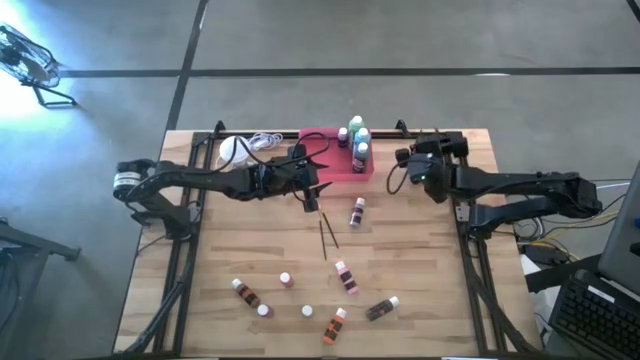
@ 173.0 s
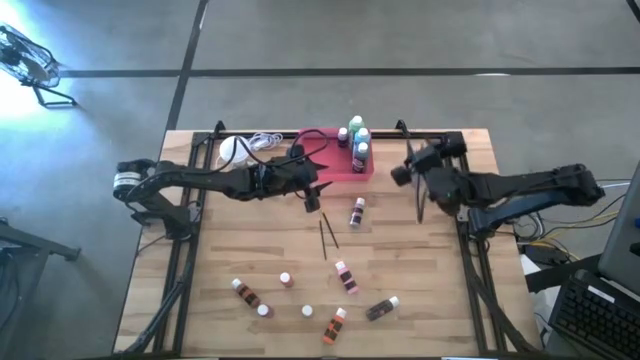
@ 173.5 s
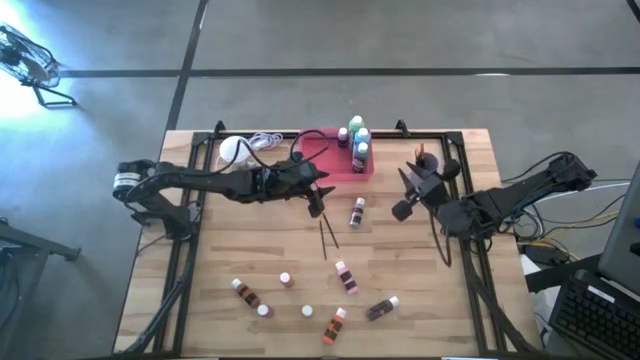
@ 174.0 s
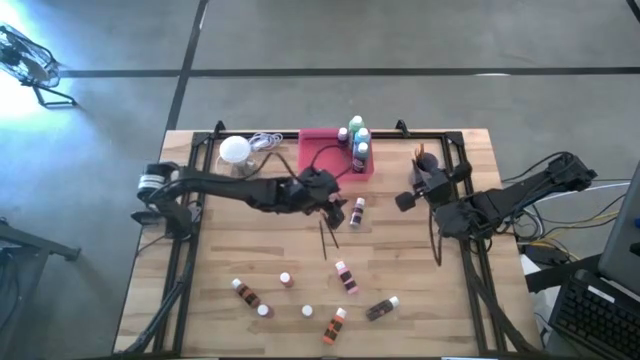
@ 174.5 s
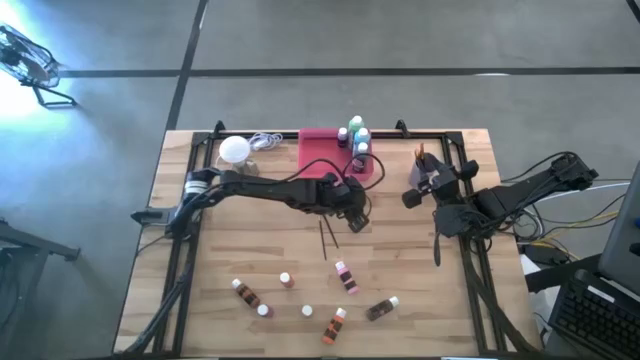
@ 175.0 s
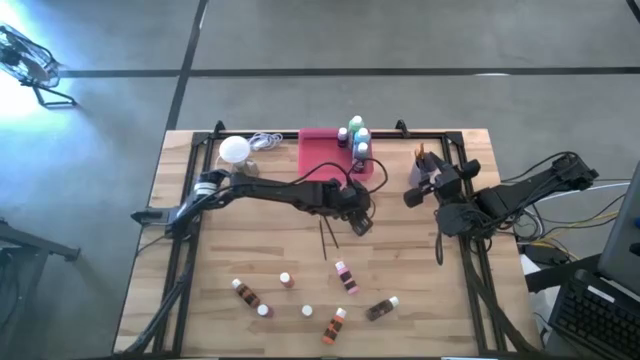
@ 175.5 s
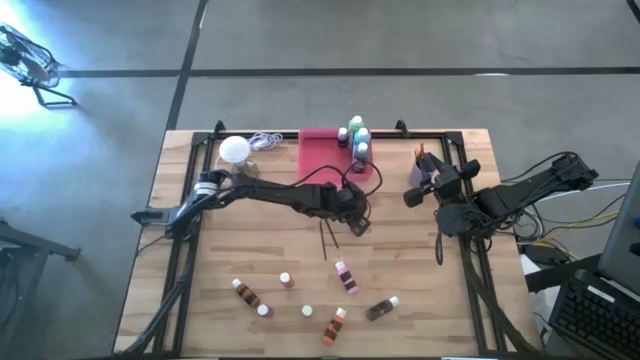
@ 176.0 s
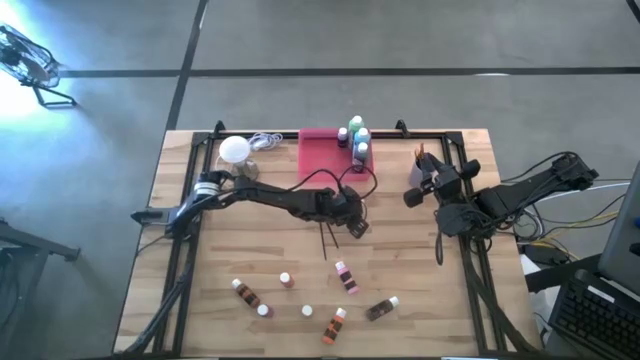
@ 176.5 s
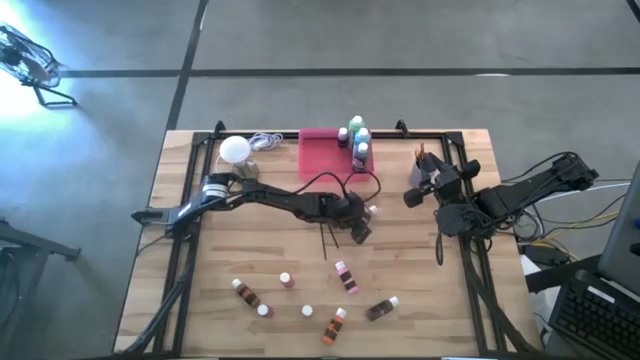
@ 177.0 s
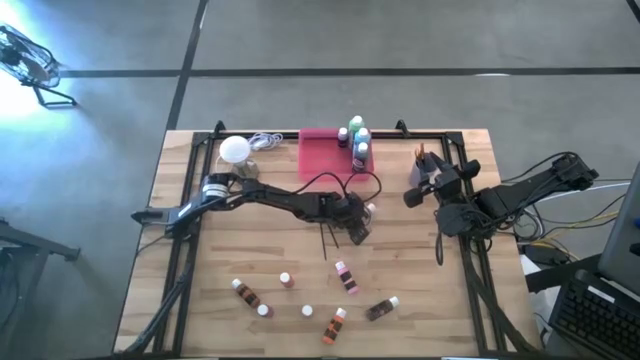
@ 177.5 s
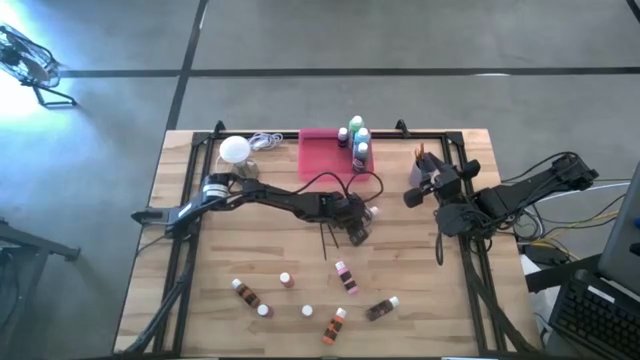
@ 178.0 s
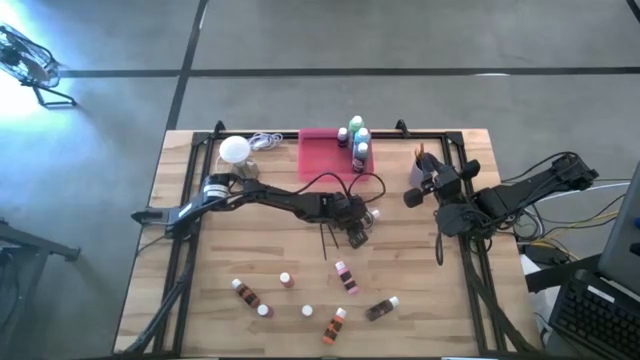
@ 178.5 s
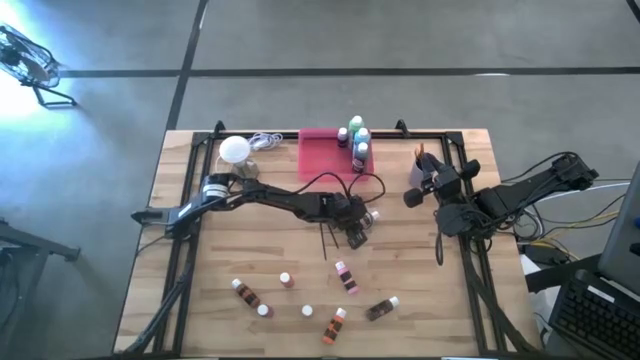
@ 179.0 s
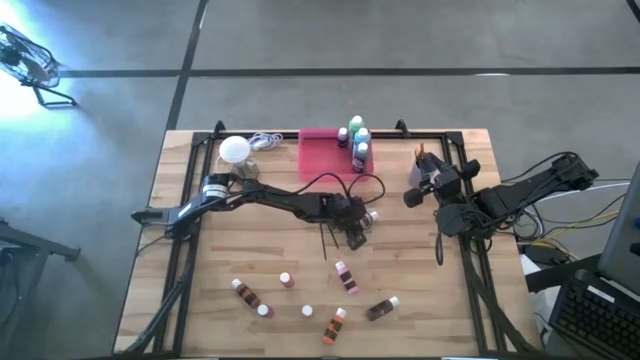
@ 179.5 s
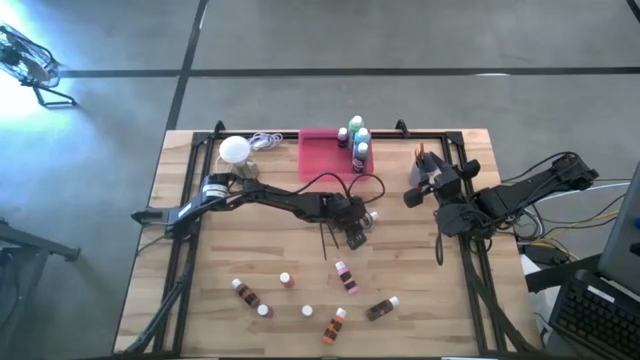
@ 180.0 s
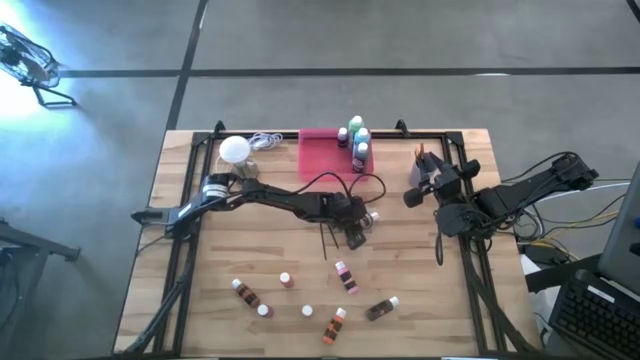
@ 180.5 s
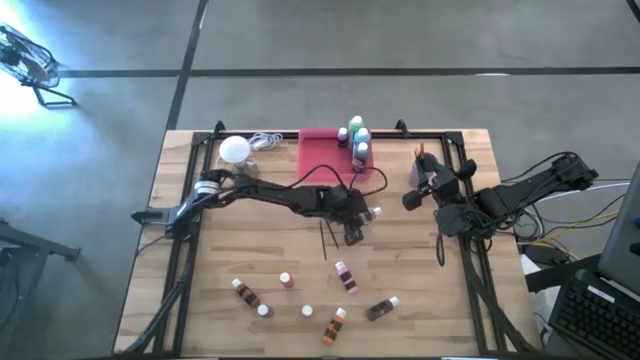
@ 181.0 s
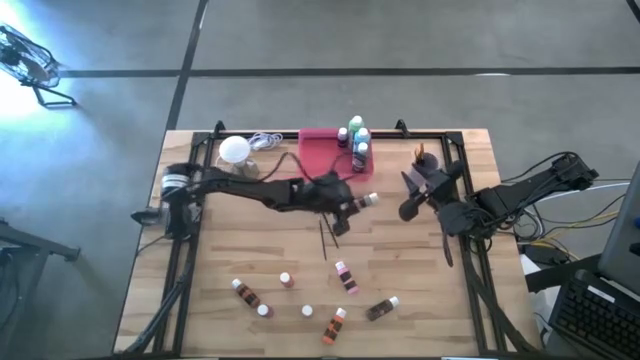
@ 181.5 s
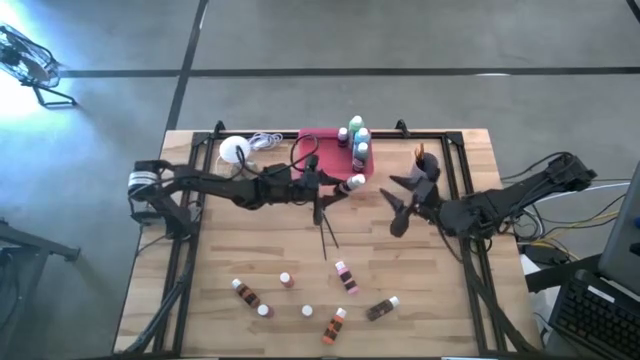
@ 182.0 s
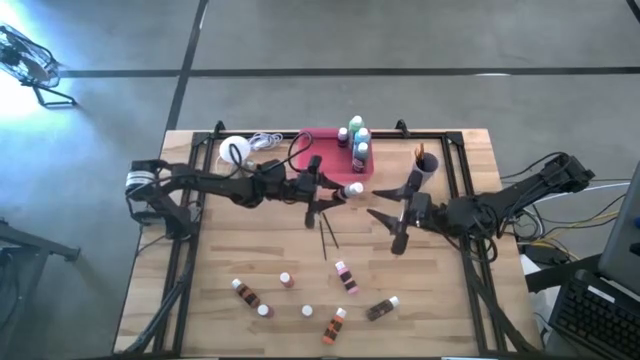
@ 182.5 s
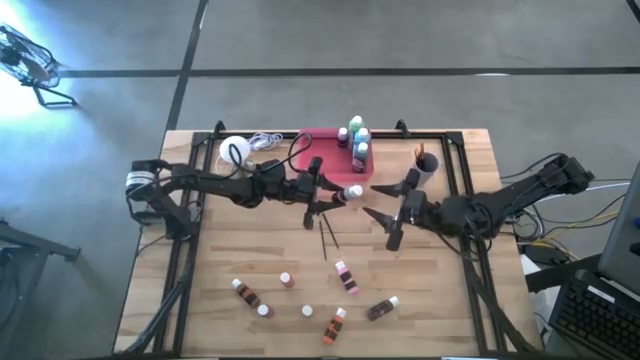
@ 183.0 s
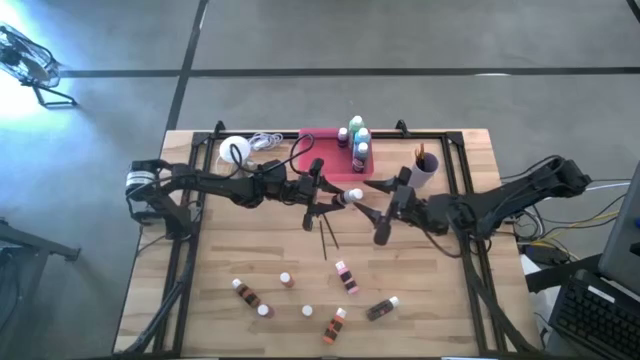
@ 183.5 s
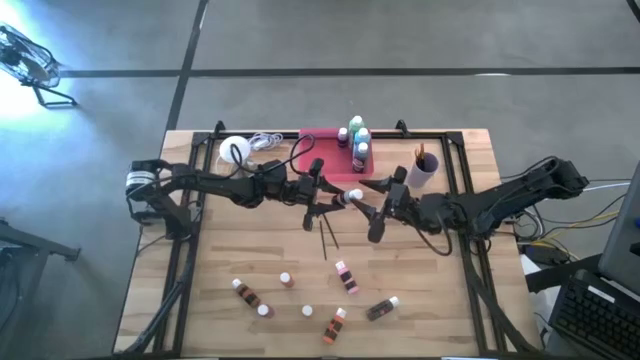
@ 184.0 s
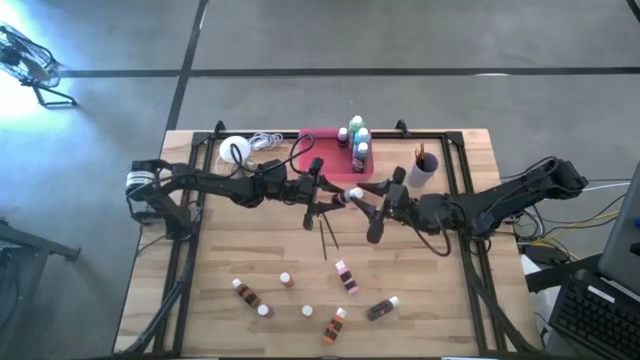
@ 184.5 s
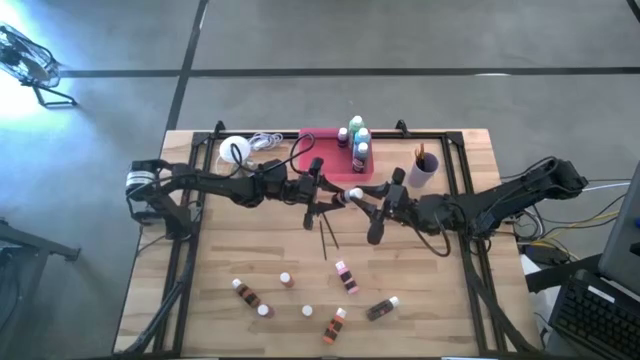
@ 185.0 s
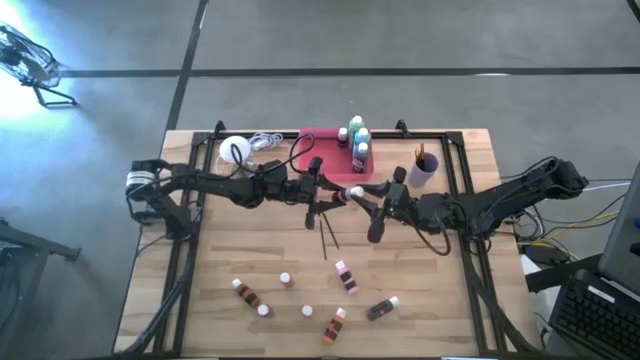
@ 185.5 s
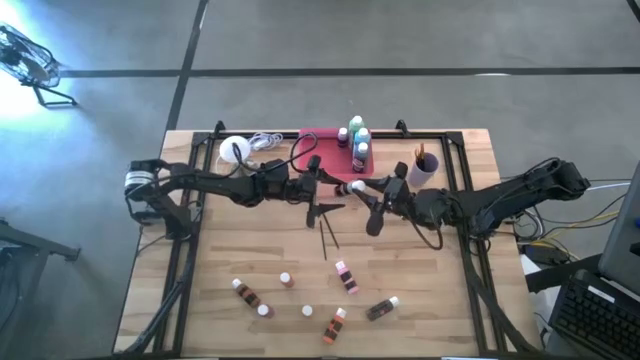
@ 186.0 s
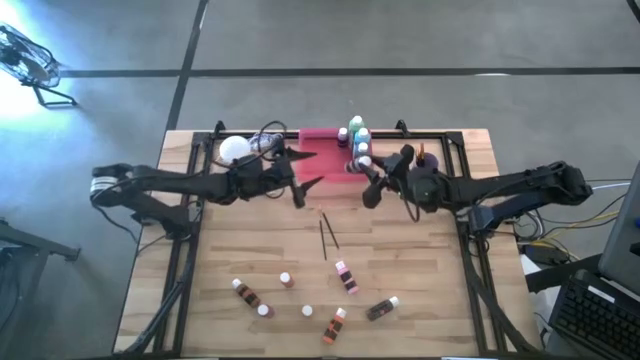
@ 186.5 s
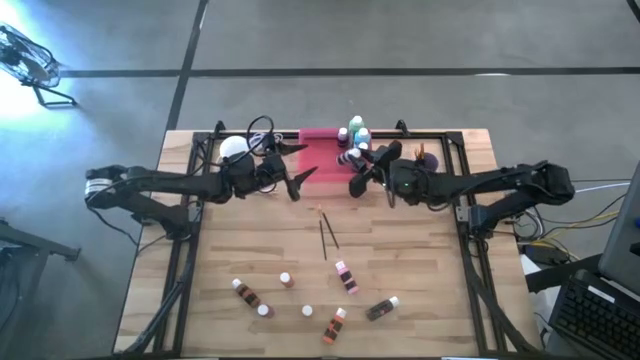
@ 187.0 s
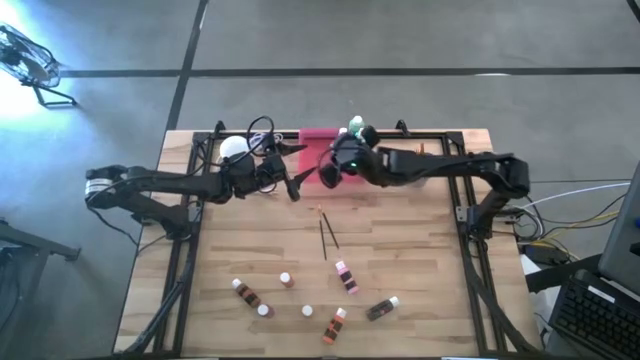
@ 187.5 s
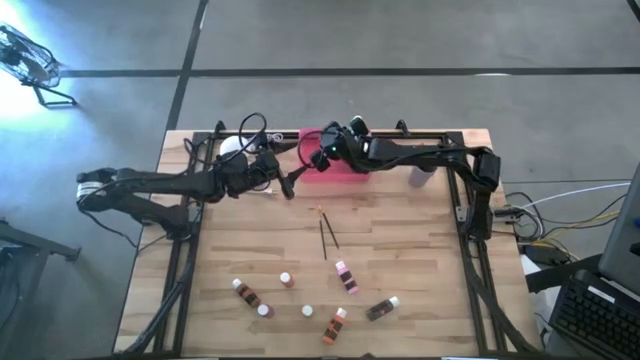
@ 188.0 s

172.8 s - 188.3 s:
Task: Pick & Place Paint Supplies
Put the grey black paint bottle into the pink bin

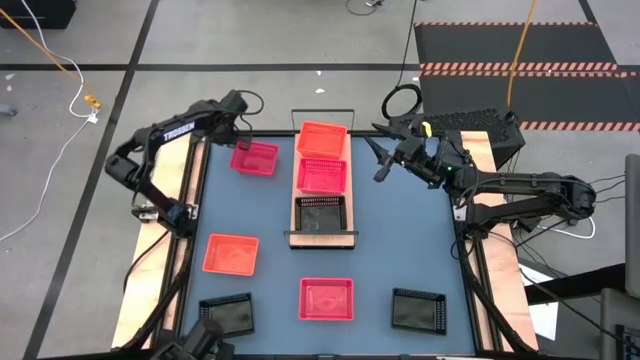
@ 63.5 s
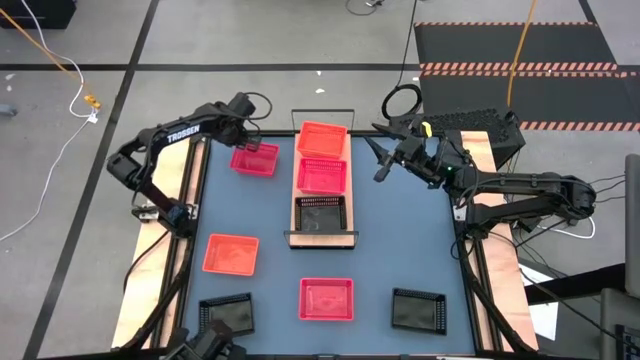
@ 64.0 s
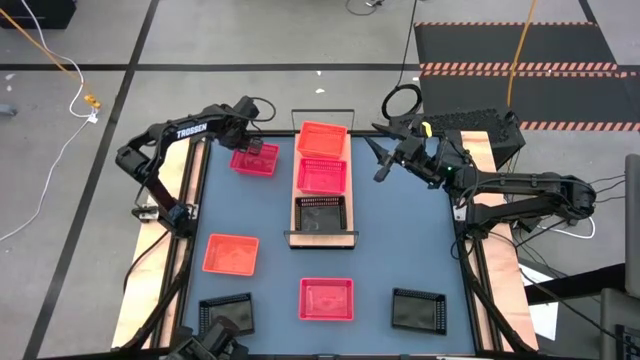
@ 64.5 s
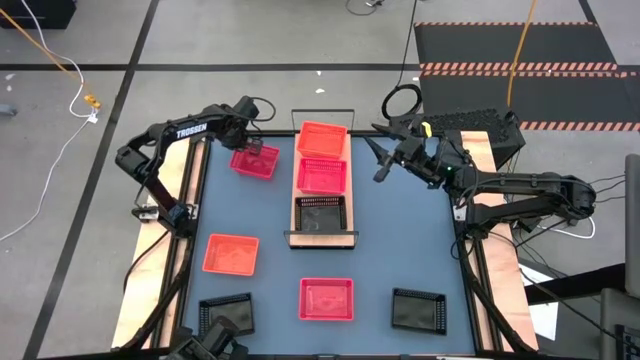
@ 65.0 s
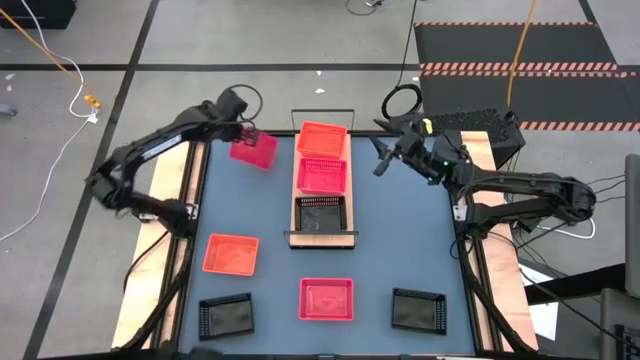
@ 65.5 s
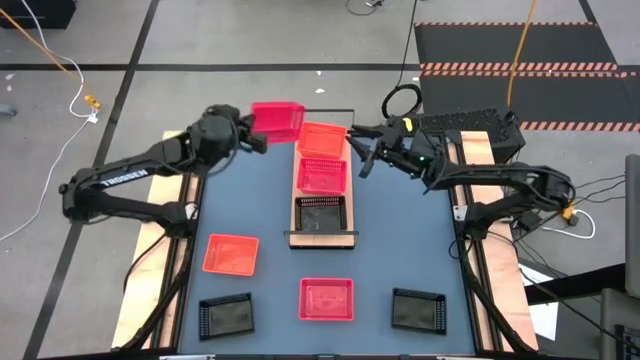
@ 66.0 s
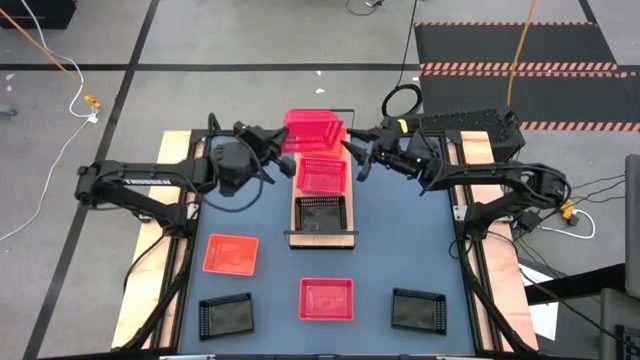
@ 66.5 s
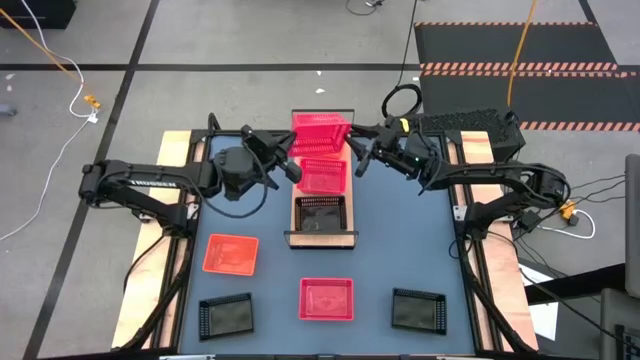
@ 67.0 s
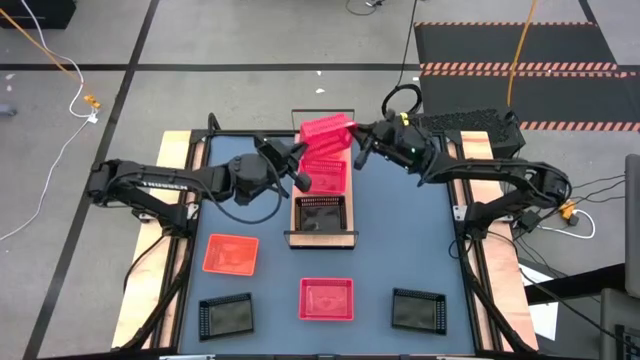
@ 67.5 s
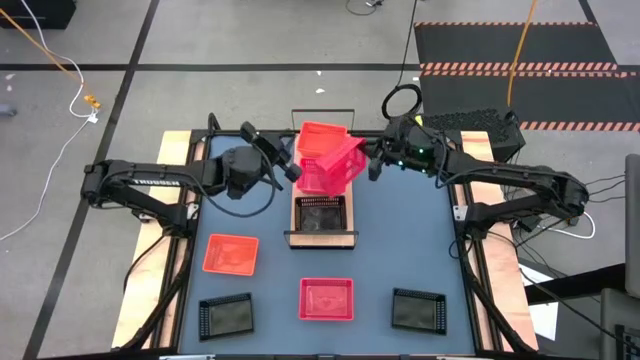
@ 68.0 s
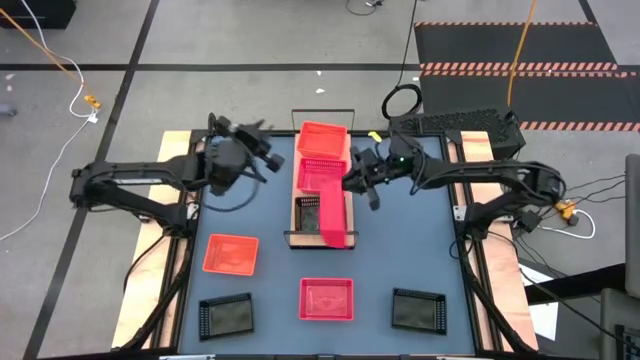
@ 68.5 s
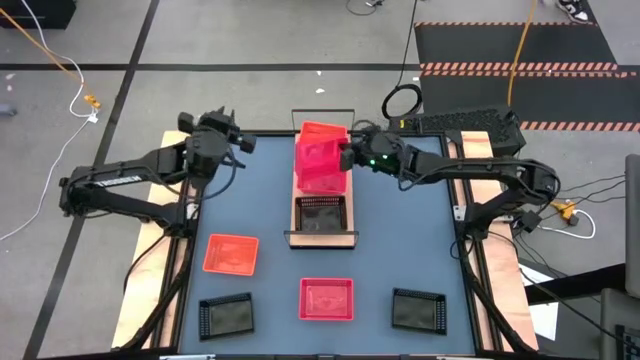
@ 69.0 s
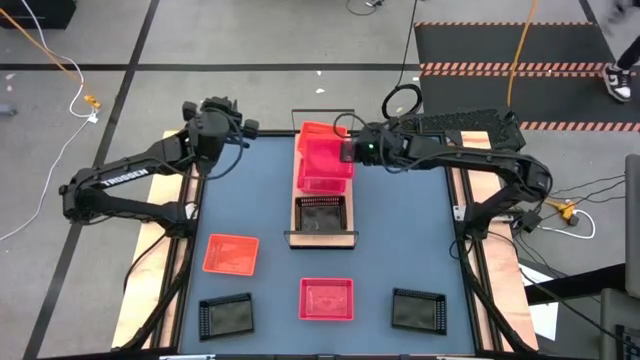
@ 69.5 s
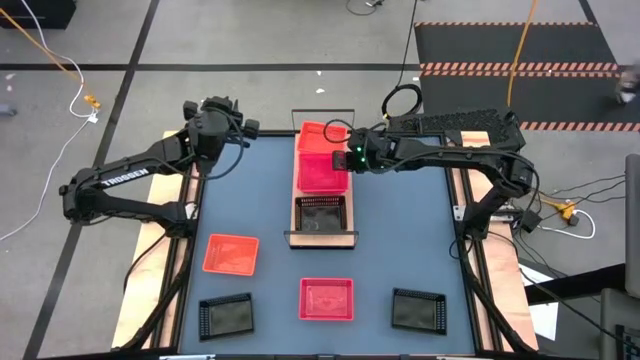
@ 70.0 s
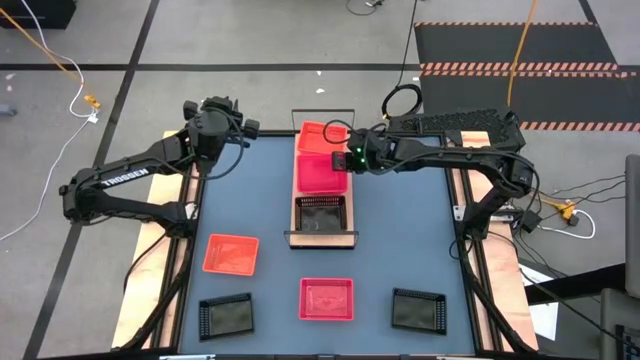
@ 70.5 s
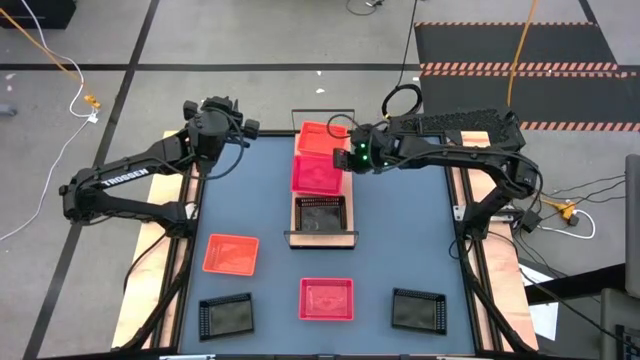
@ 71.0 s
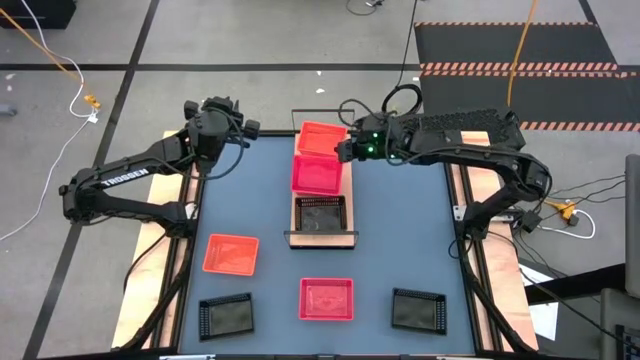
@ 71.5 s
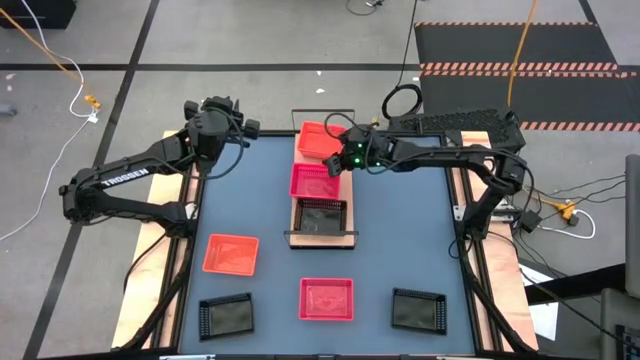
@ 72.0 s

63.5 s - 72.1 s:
Task: Stack baskets on shelf by color
Stack the top red bin on the red bin on the shelf
